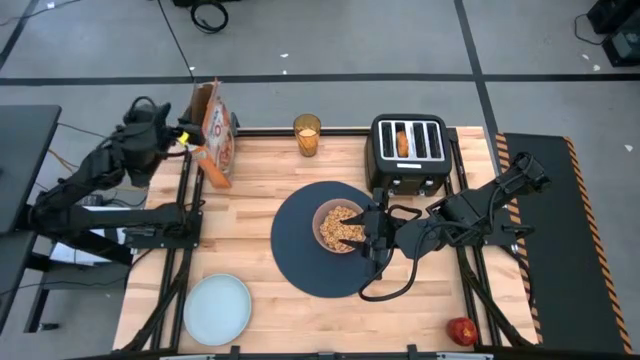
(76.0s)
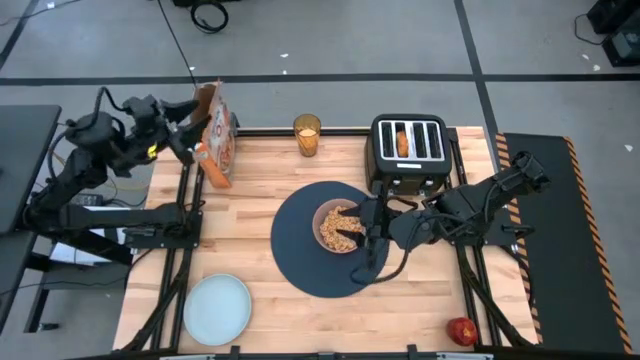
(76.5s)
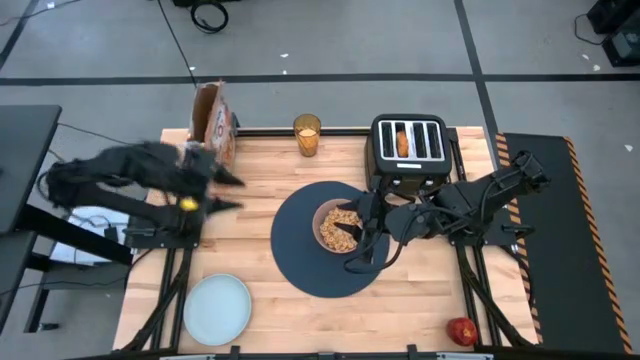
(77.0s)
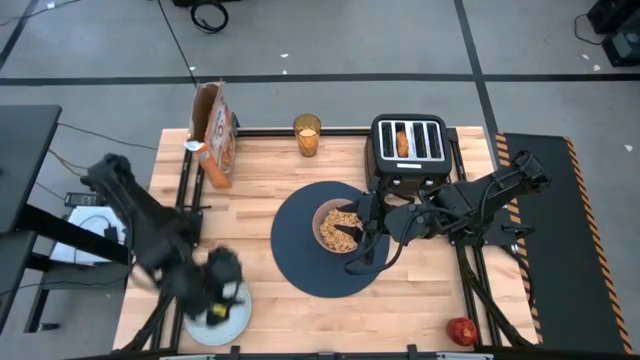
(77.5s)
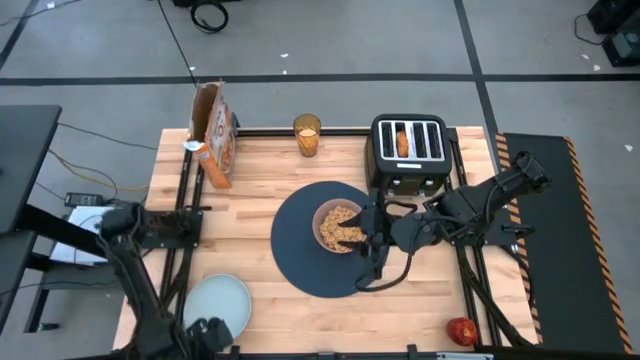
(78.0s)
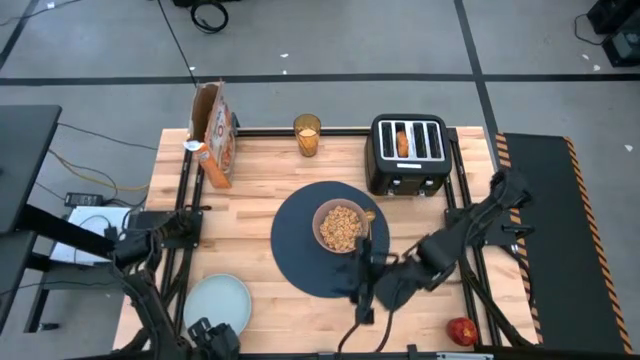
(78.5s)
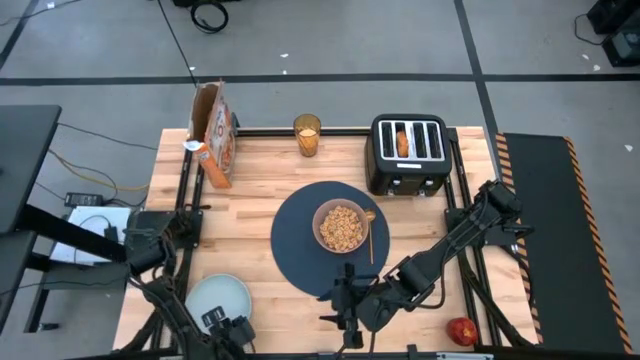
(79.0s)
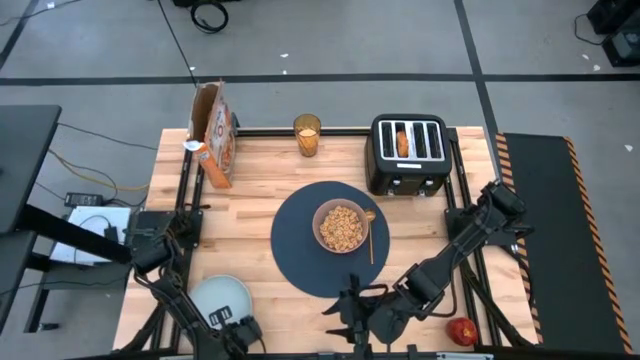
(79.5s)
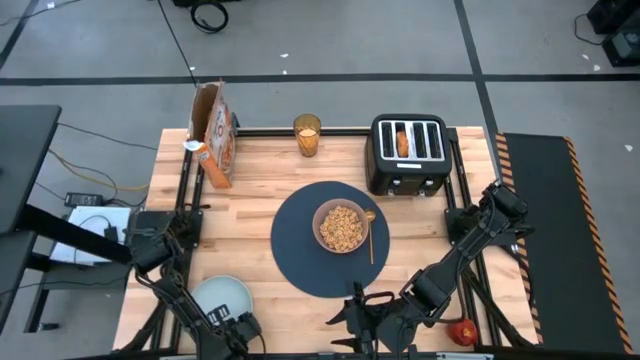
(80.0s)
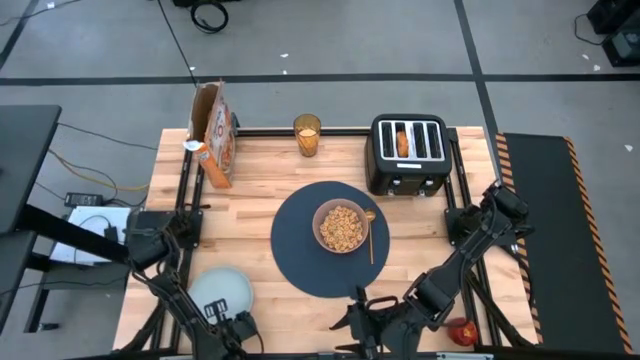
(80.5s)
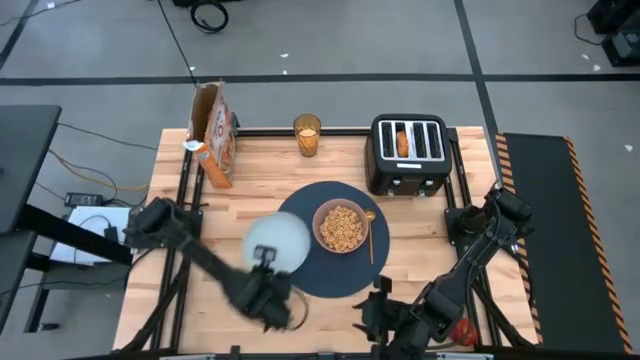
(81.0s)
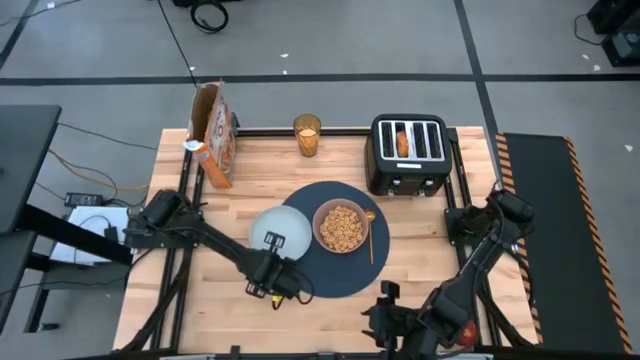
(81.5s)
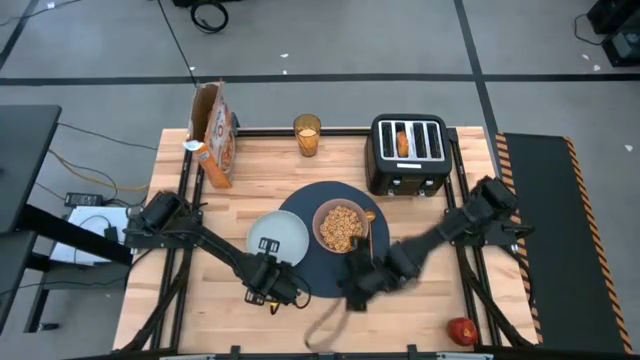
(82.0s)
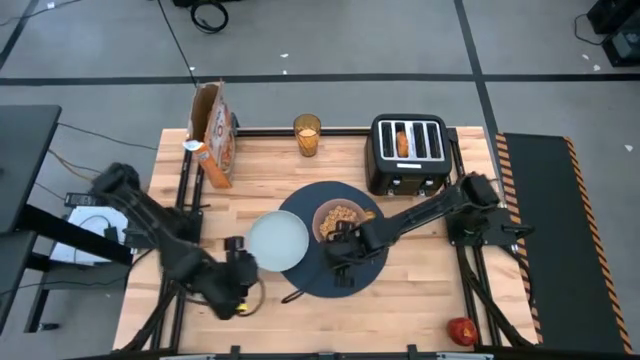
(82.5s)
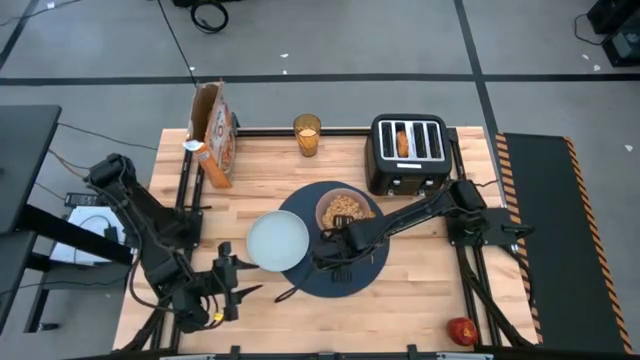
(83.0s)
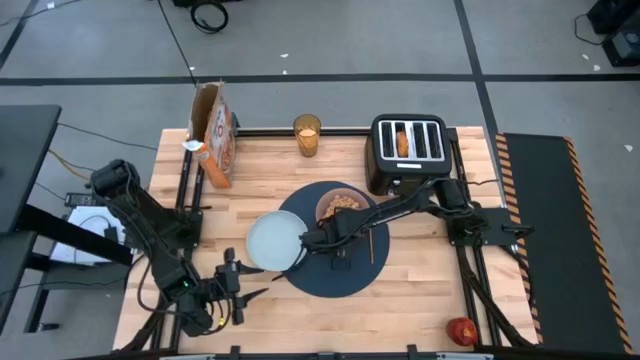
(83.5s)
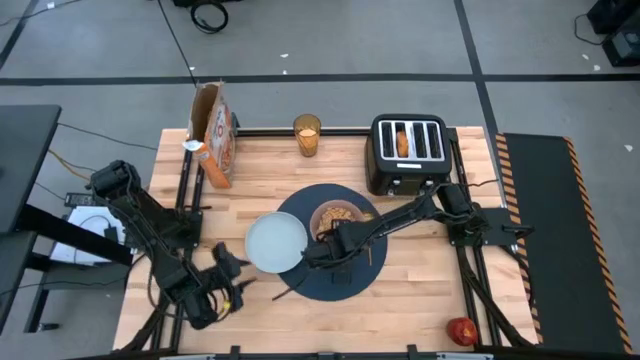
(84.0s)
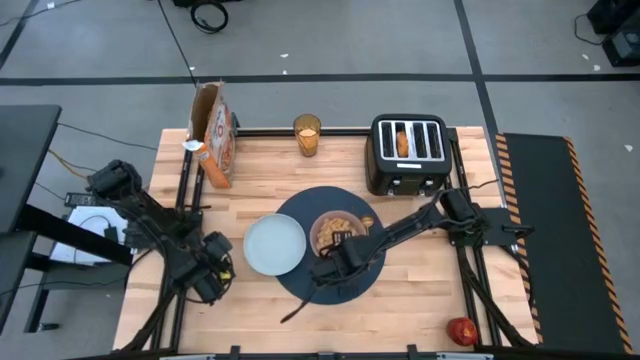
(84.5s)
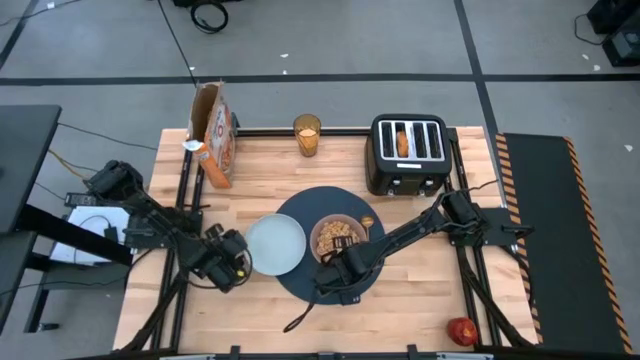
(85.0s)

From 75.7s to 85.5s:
Task: Arrange a breakfast setting
Put the plate beside the bowl on the placemat

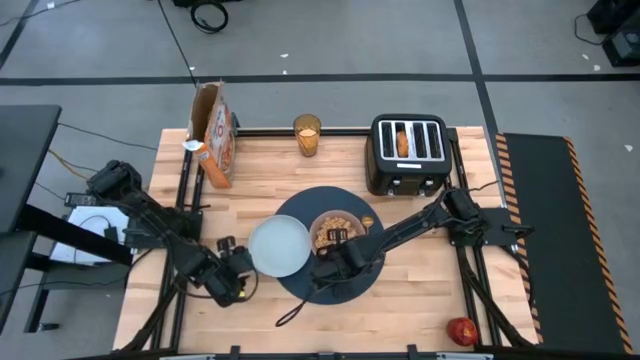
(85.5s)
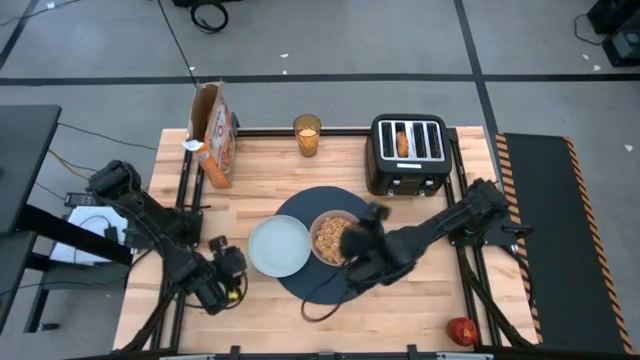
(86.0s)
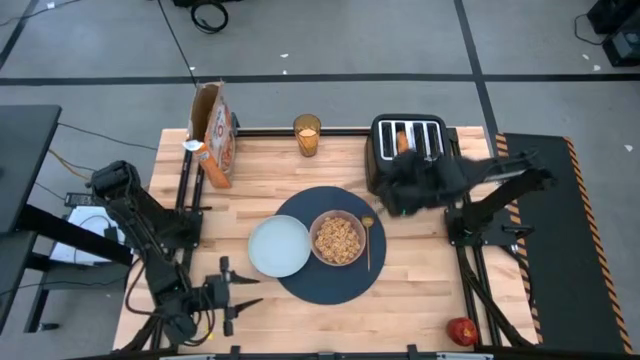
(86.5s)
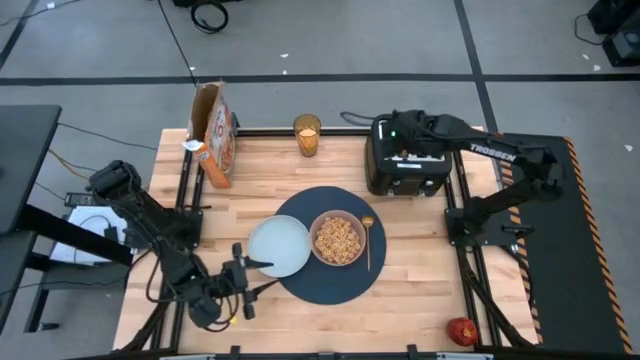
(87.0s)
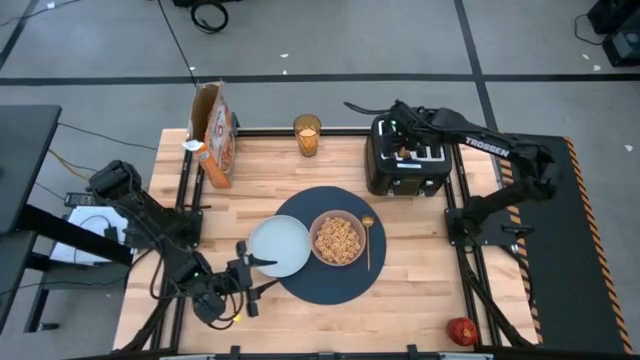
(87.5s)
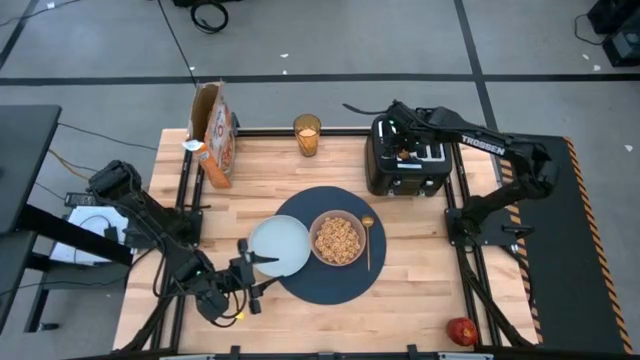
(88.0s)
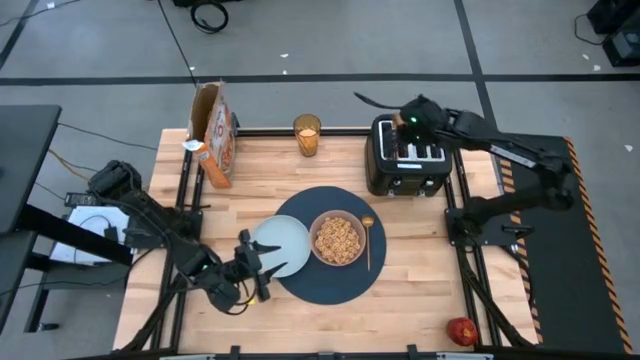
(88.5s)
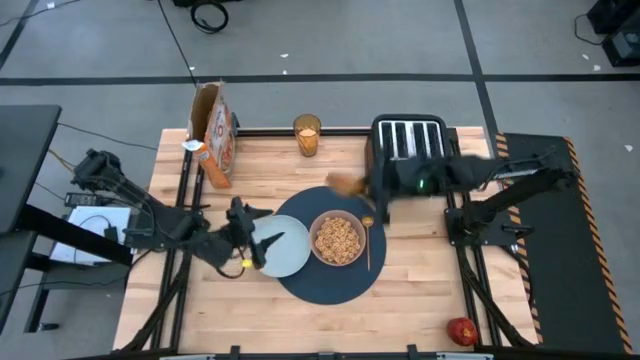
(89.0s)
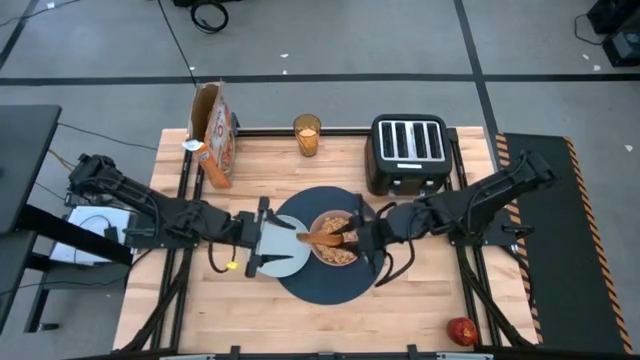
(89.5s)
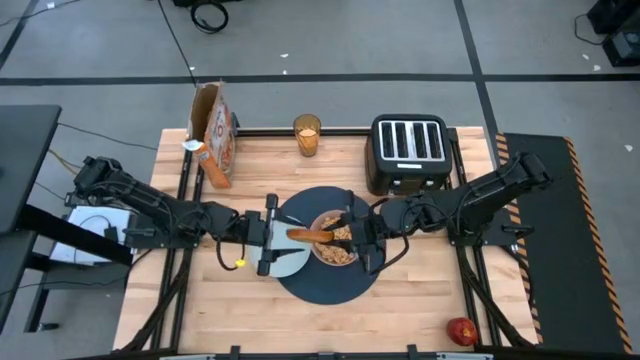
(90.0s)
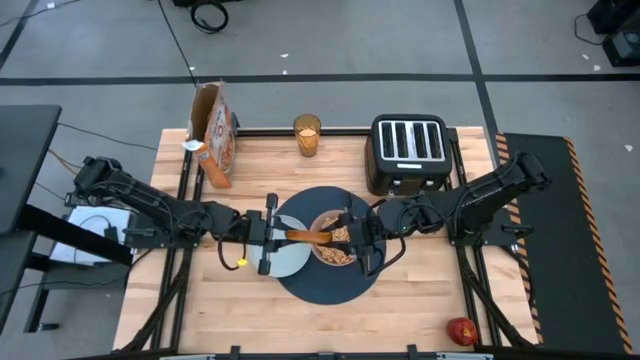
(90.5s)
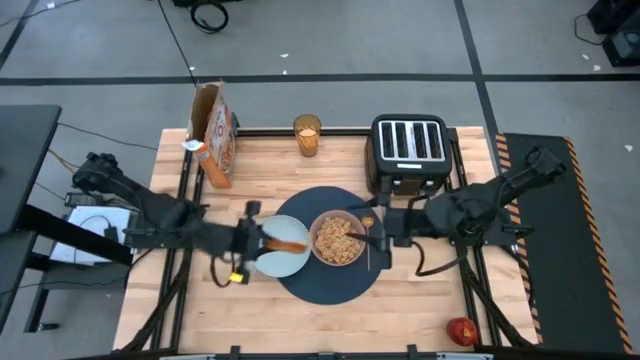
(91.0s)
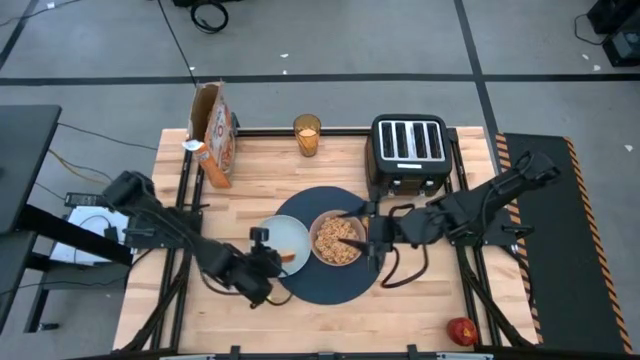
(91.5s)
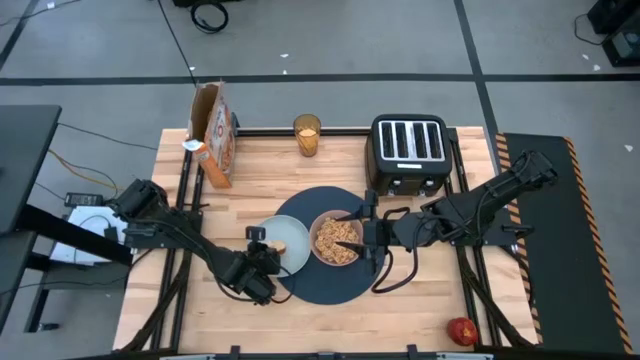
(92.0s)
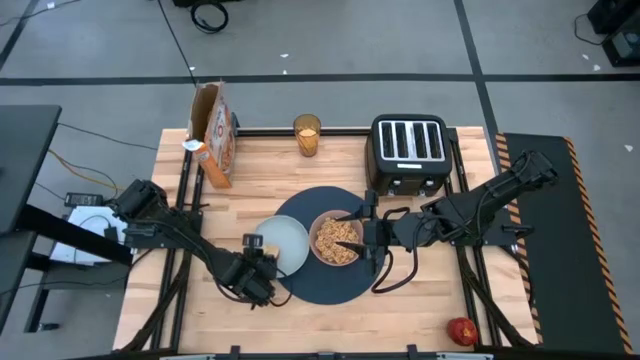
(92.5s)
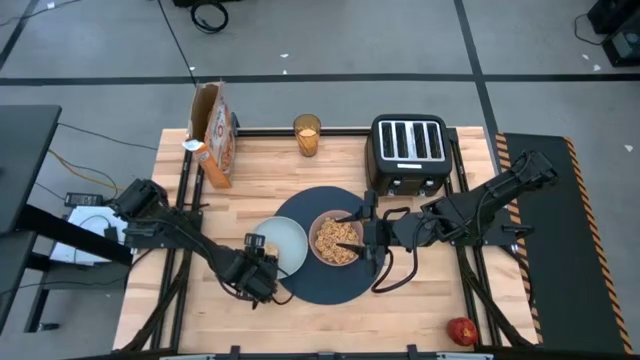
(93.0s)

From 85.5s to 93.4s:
Put the bagel on the plate
